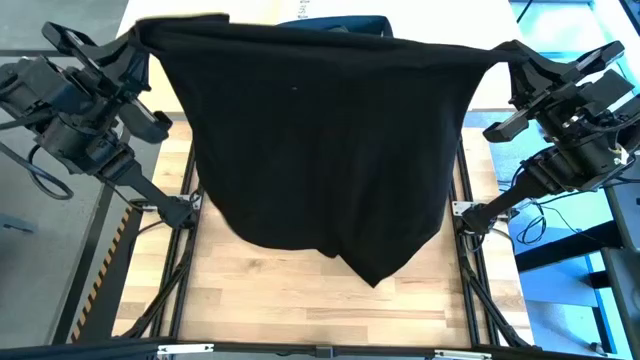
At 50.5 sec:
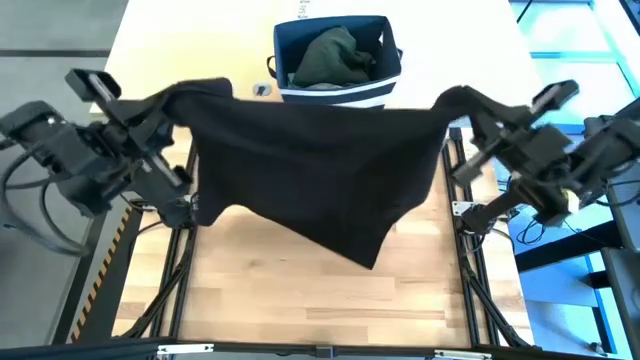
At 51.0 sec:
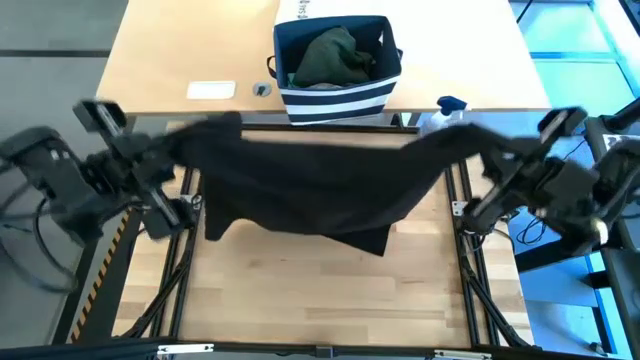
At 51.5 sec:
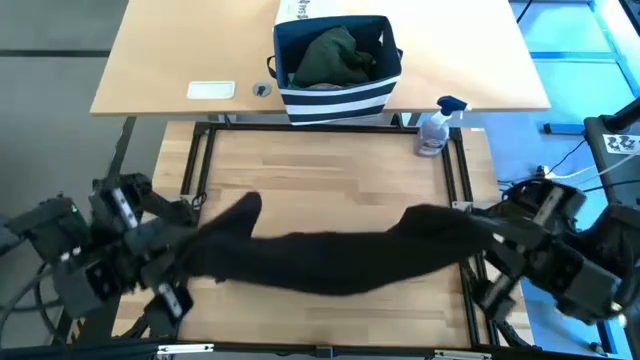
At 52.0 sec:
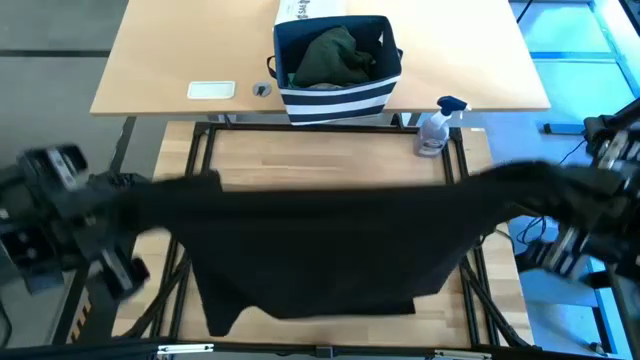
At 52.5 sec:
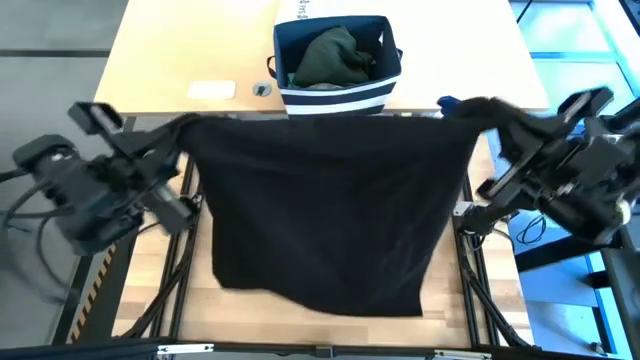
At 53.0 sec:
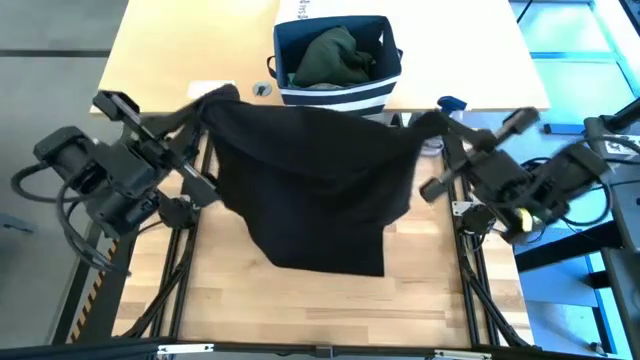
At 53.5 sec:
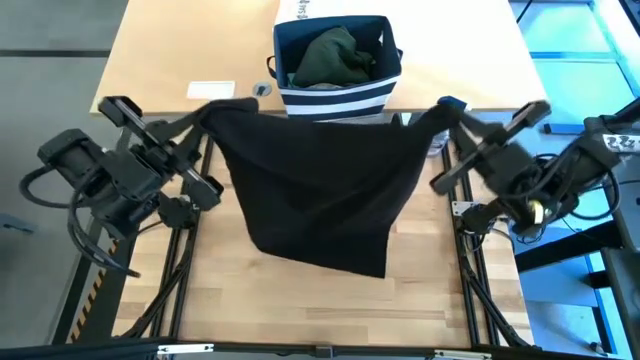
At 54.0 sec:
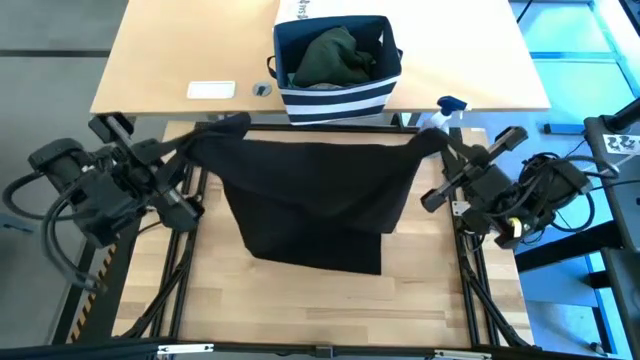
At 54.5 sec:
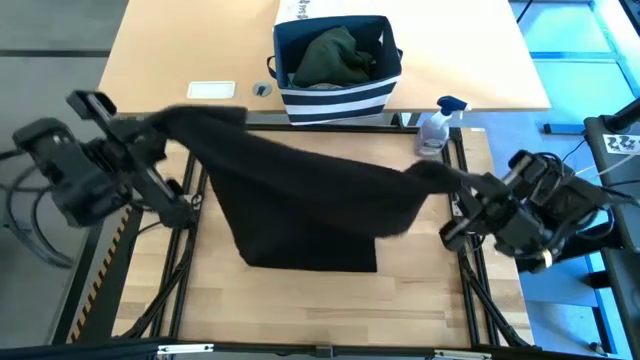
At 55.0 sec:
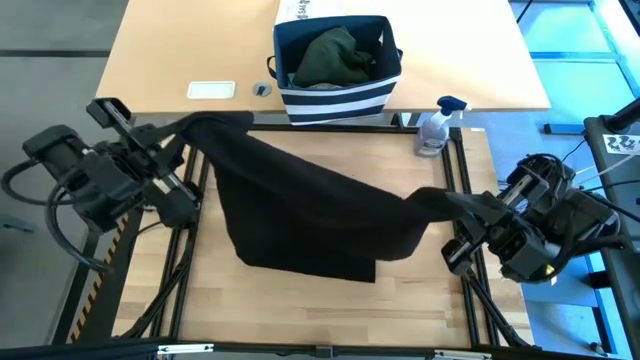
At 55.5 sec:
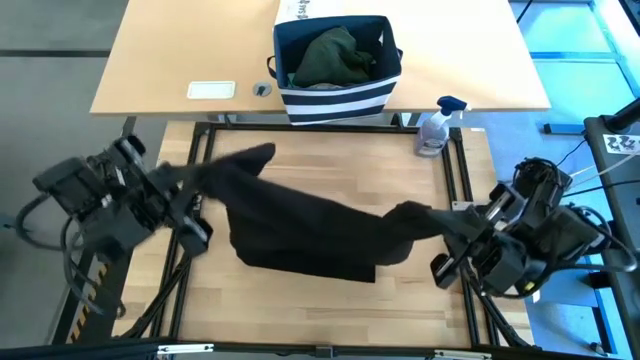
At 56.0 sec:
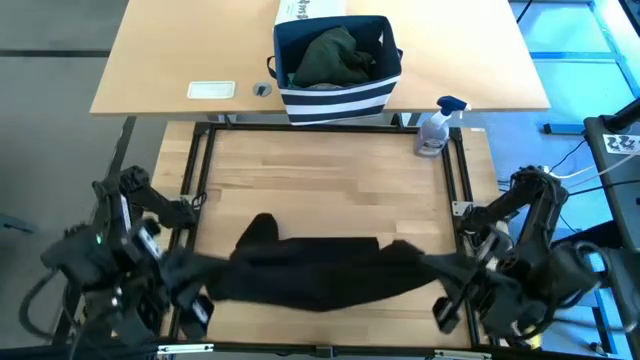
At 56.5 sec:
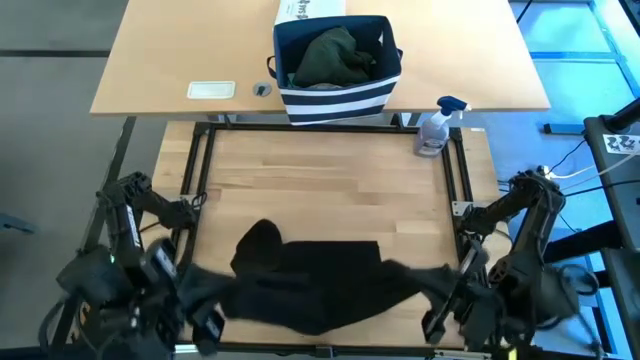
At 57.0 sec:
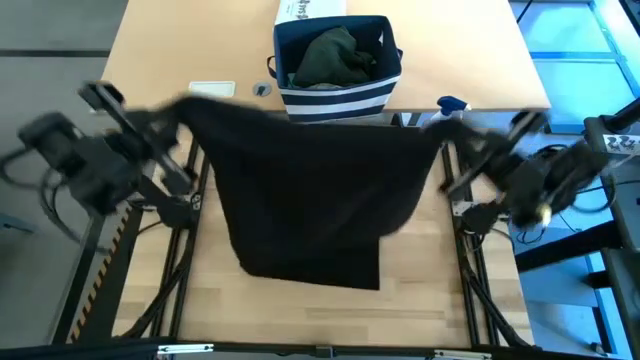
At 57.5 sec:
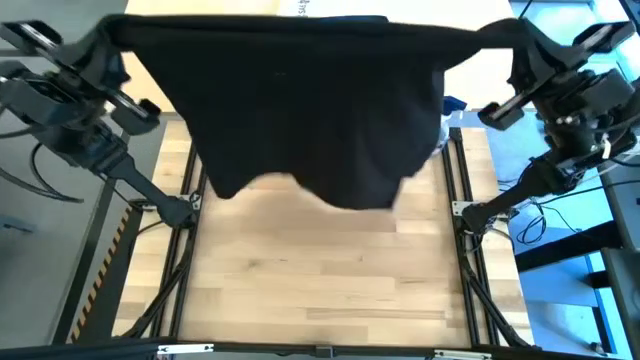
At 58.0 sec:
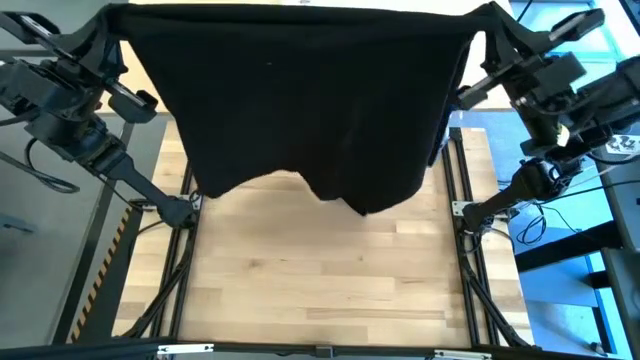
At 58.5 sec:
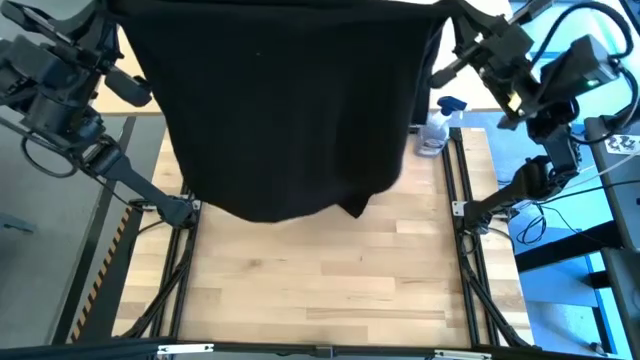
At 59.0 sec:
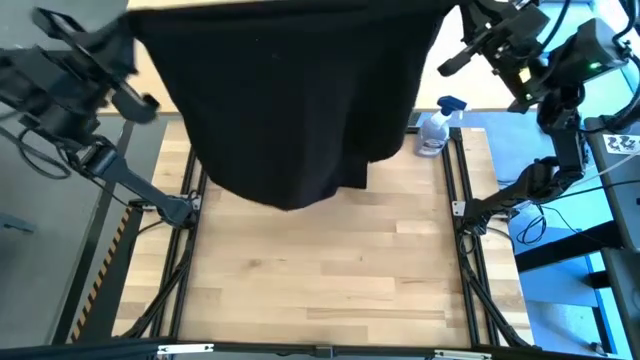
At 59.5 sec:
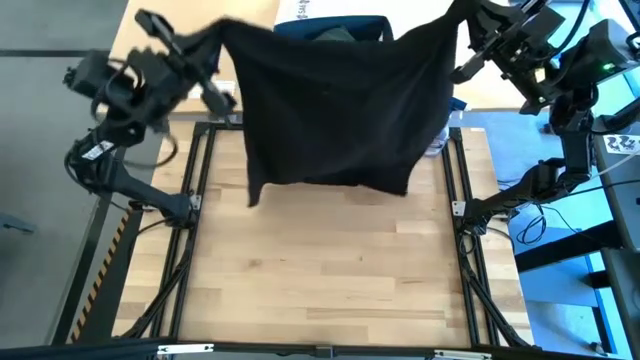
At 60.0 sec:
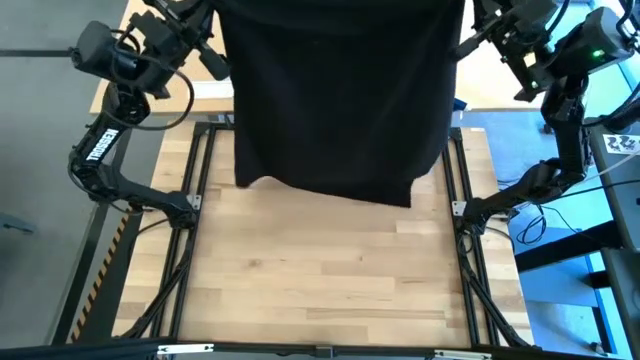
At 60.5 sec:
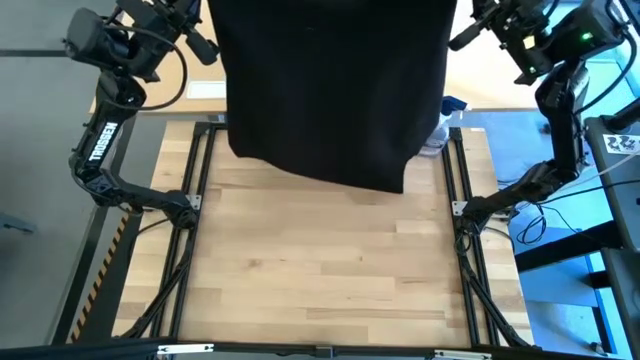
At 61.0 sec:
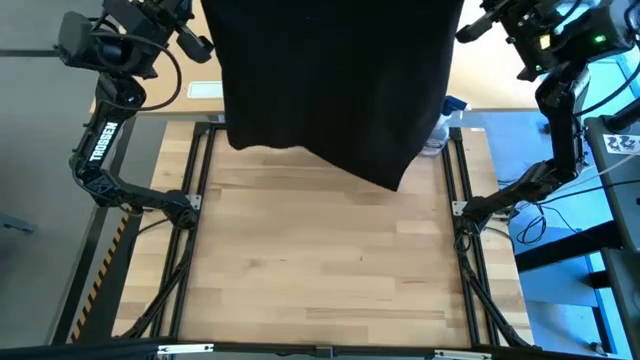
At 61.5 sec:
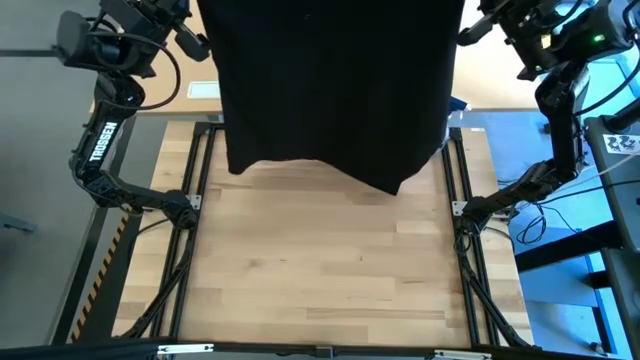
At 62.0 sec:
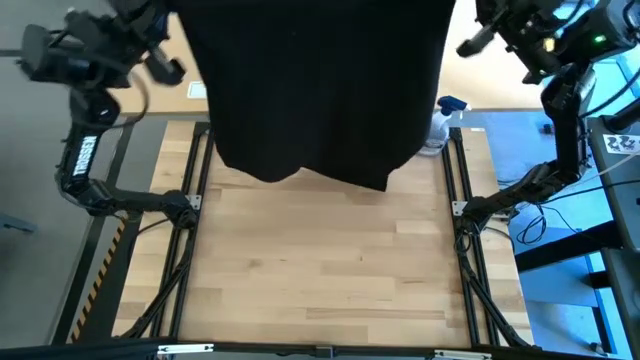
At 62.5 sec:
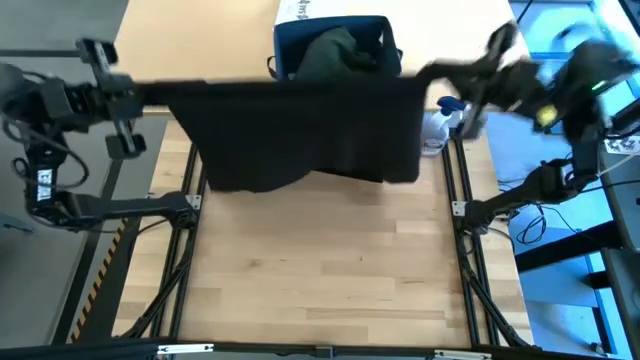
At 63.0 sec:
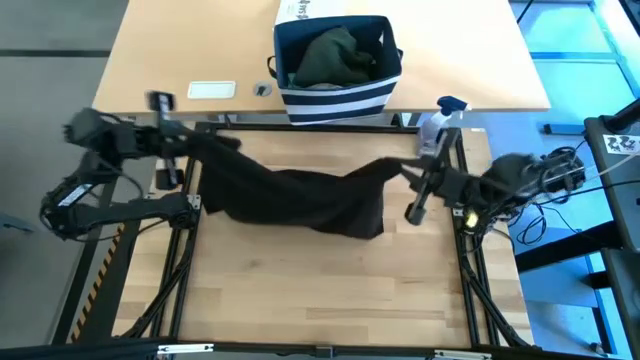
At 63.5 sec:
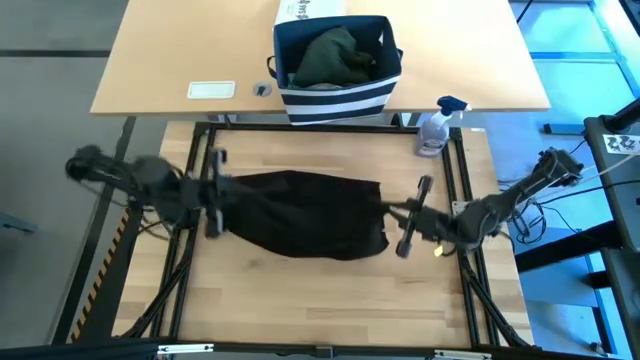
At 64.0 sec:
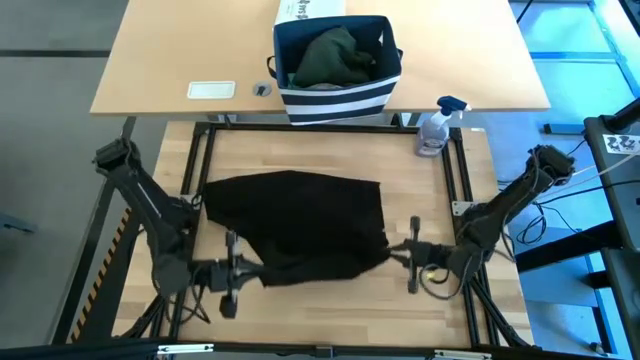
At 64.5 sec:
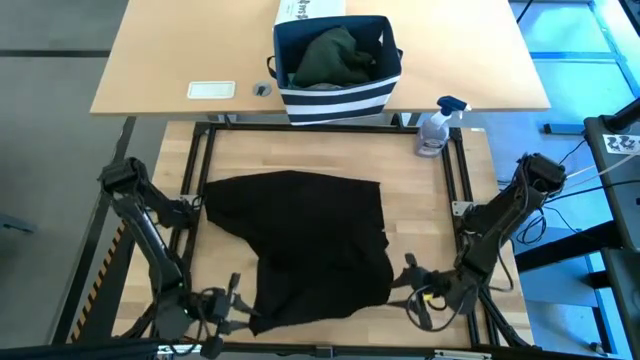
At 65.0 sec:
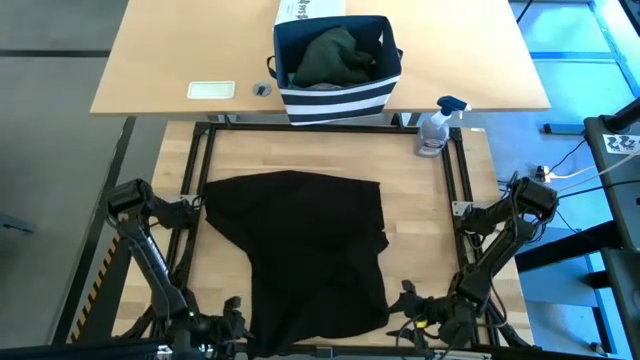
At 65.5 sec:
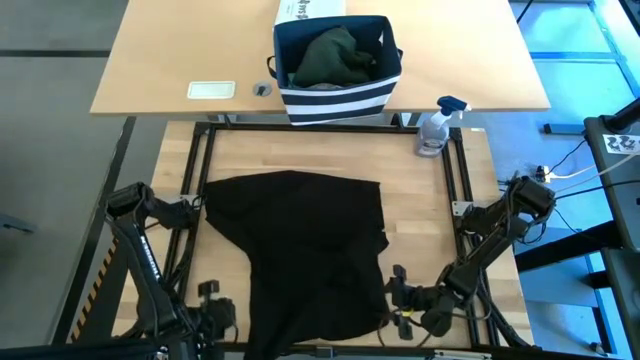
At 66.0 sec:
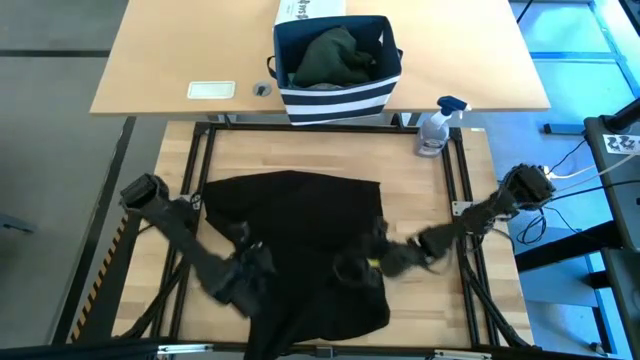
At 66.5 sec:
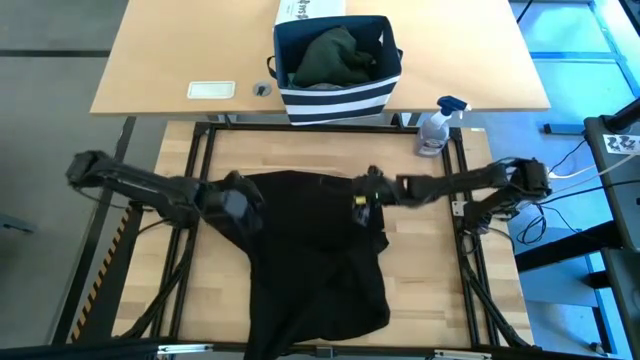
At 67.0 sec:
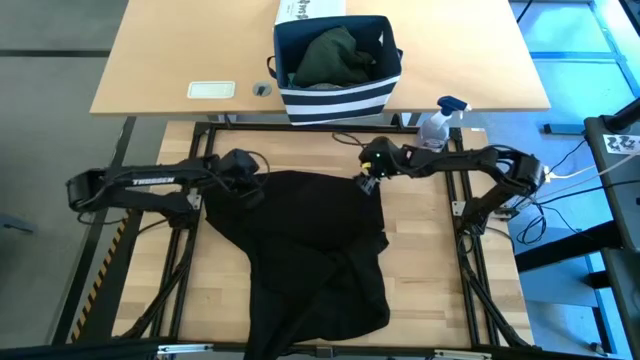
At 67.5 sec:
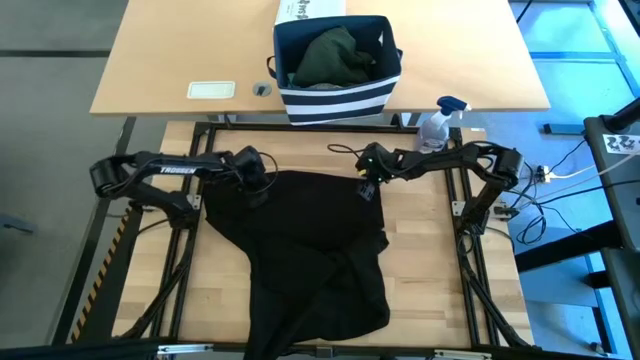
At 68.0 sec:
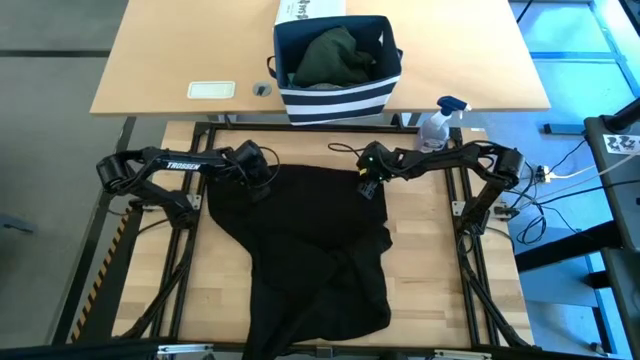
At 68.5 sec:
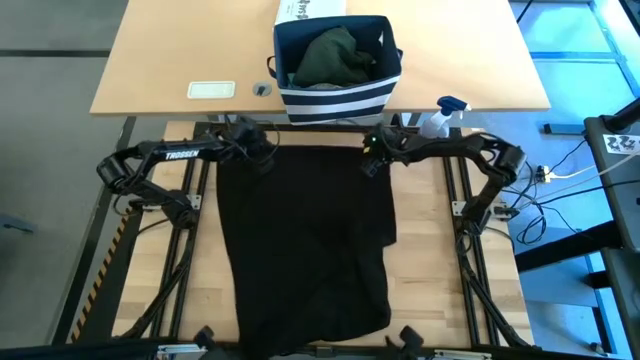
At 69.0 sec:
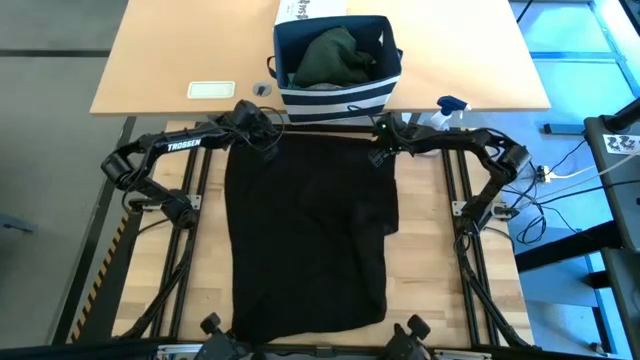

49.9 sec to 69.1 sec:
Task: Fold Laundry from Bin
Fold the black shirt

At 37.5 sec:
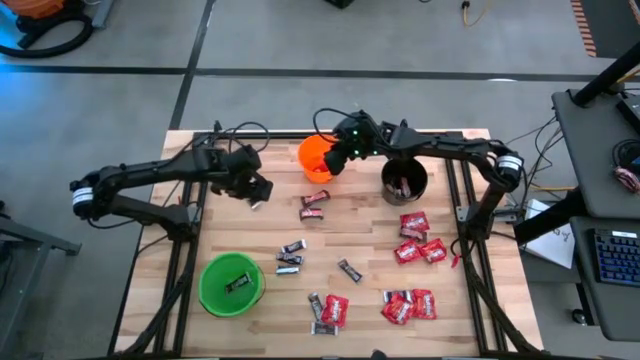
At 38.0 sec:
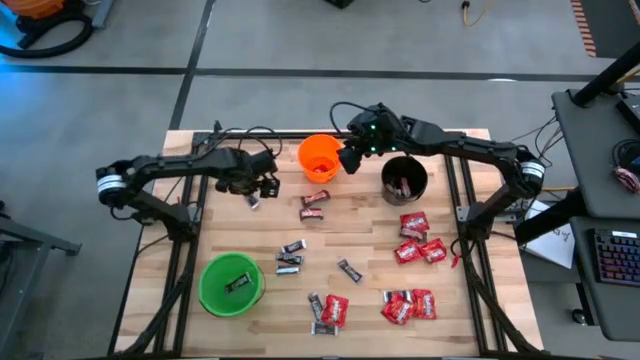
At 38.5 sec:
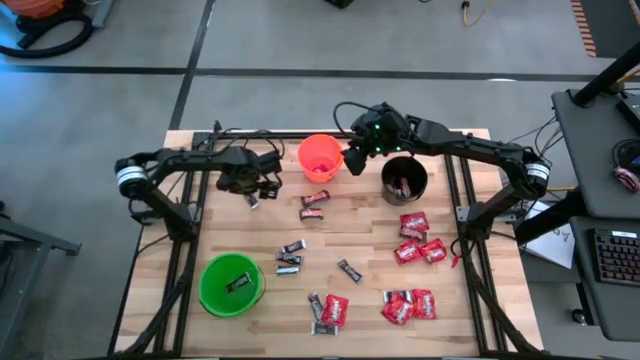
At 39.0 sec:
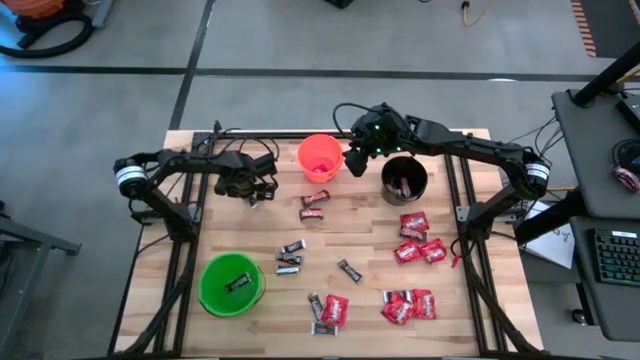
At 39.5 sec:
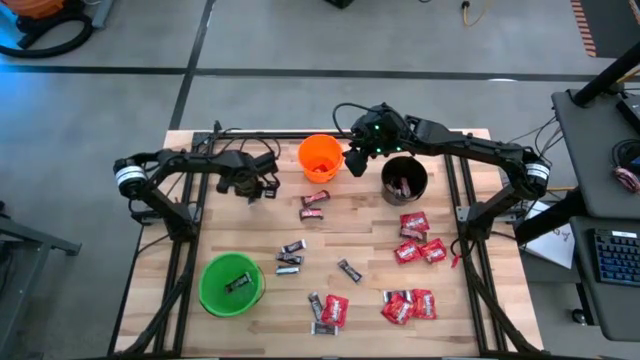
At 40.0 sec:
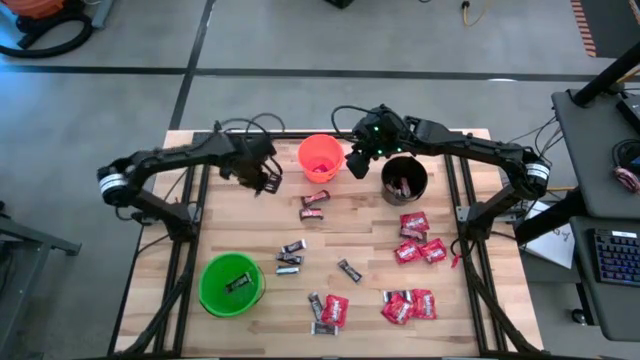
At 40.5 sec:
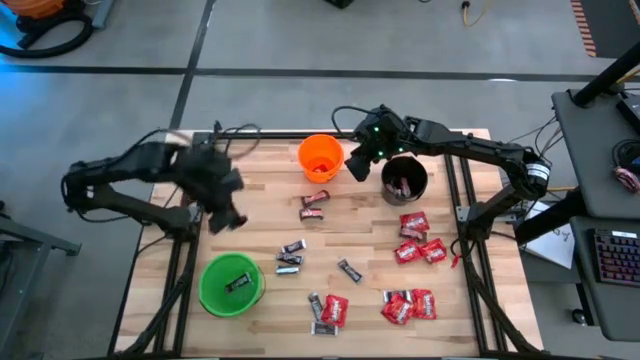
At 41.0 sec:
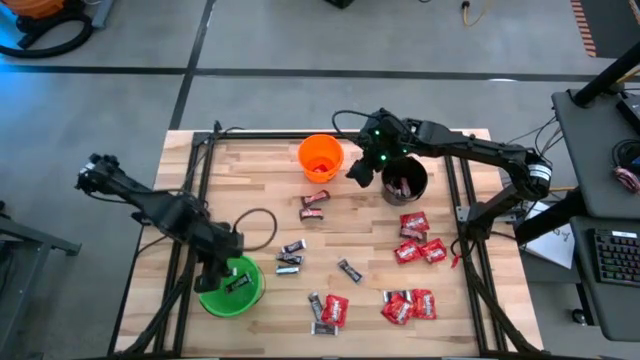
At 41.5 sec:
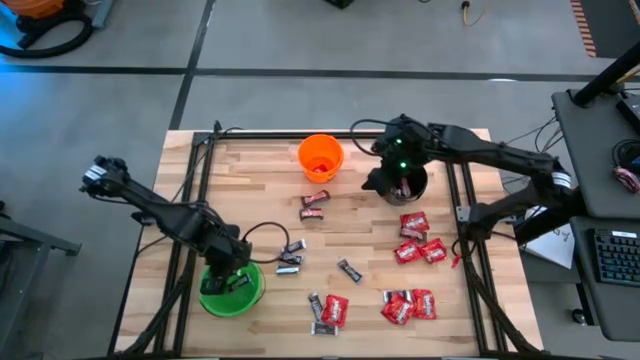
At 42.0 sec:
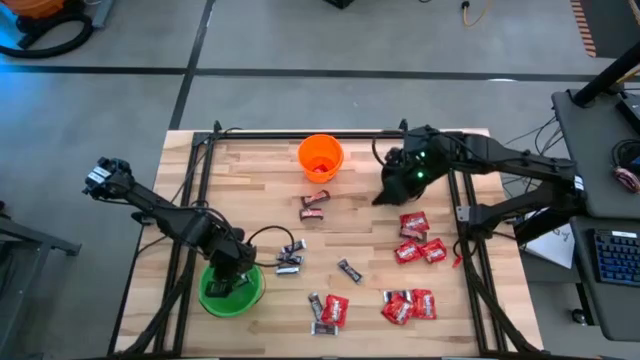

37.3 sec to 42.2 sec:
Task: Sort candy
Put the black chocolate into the green bucket
